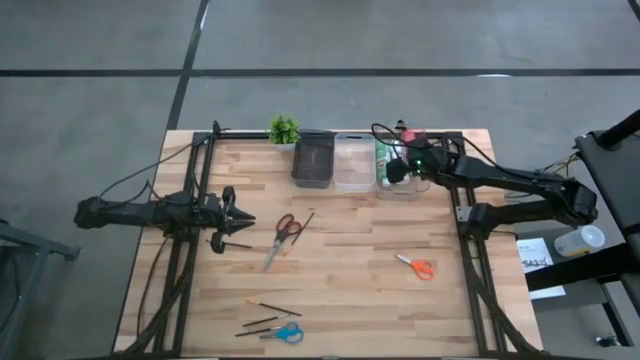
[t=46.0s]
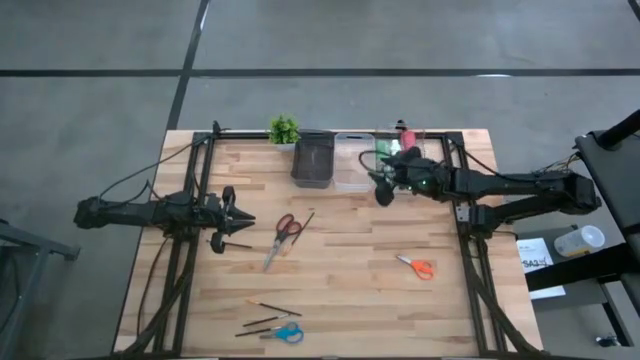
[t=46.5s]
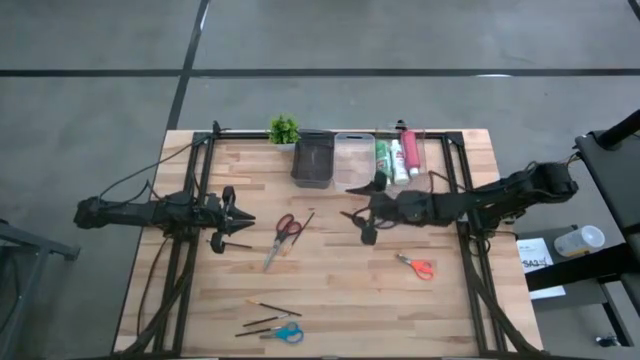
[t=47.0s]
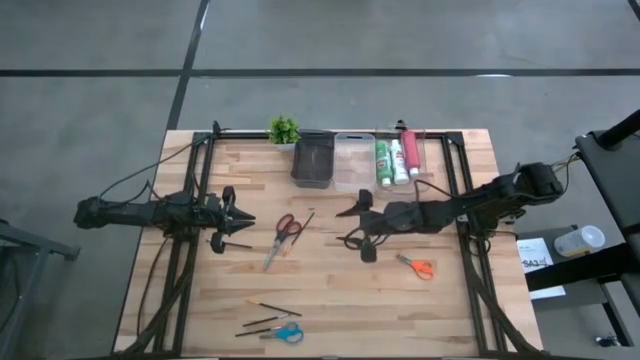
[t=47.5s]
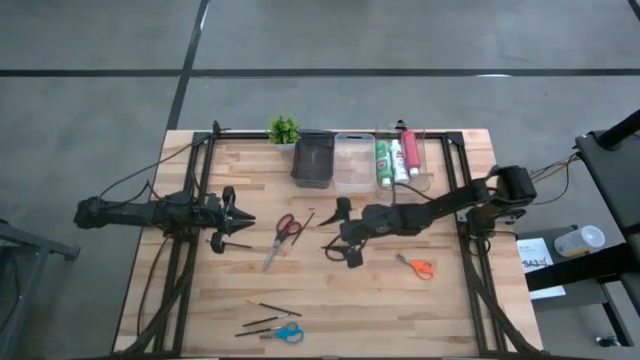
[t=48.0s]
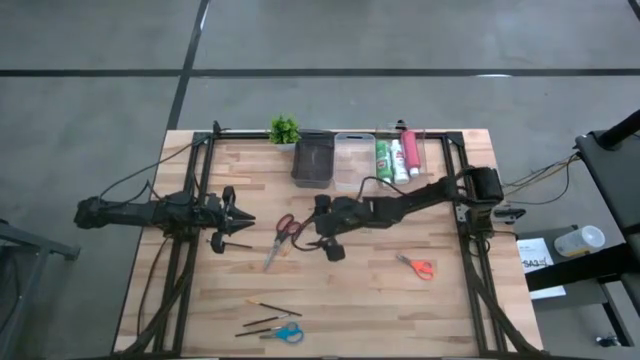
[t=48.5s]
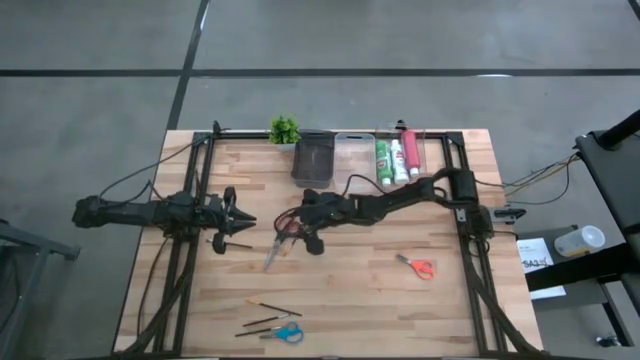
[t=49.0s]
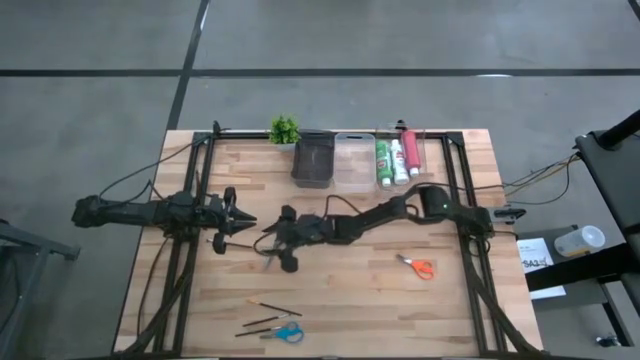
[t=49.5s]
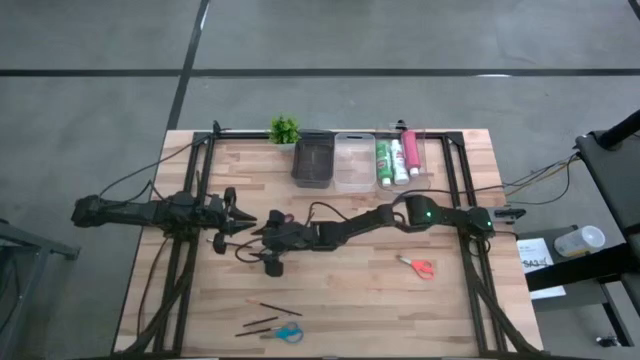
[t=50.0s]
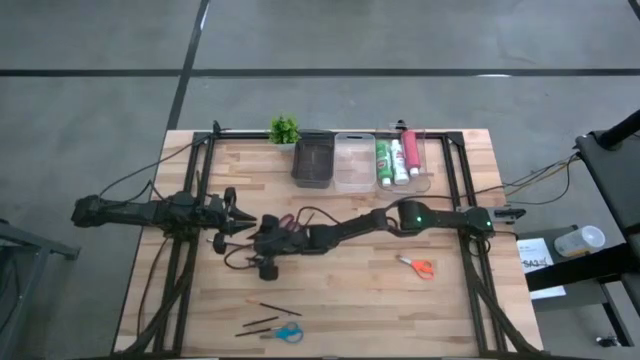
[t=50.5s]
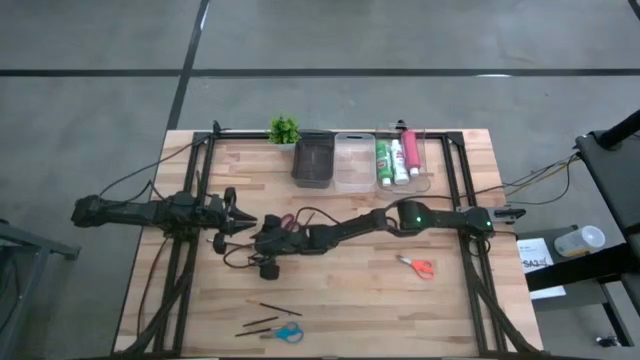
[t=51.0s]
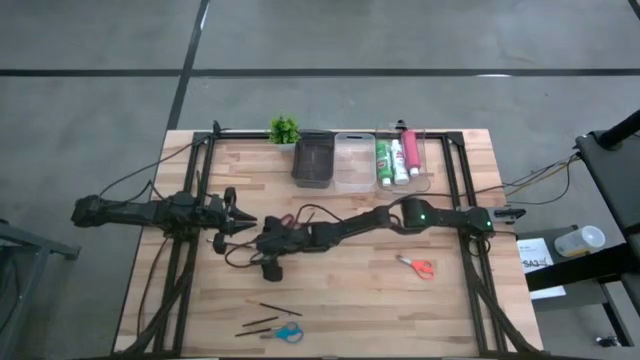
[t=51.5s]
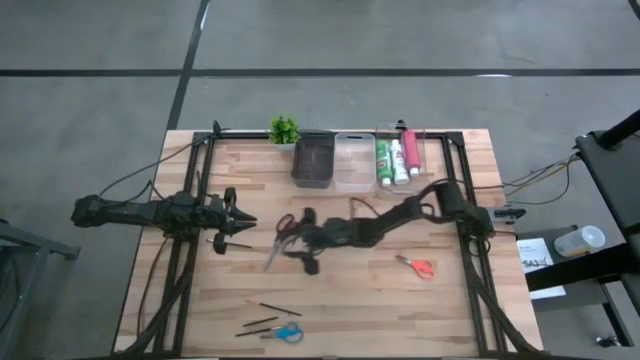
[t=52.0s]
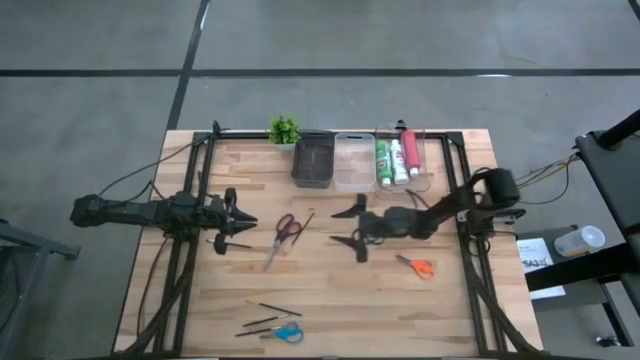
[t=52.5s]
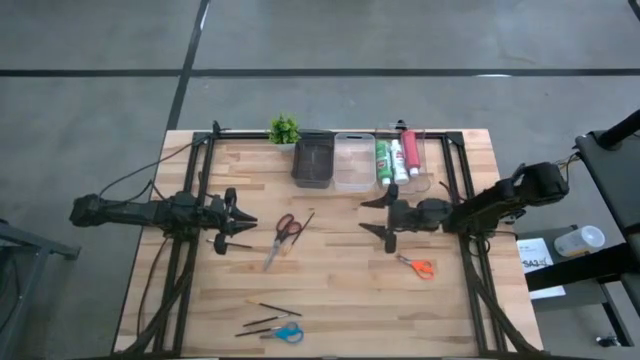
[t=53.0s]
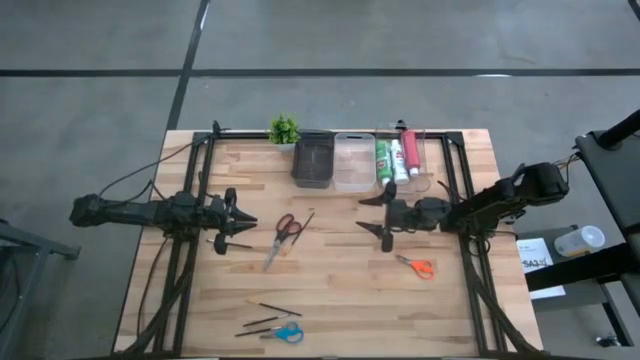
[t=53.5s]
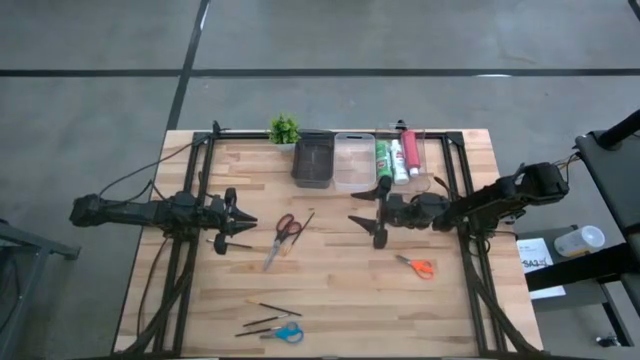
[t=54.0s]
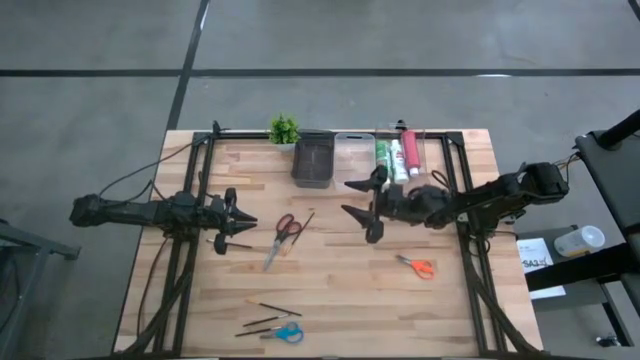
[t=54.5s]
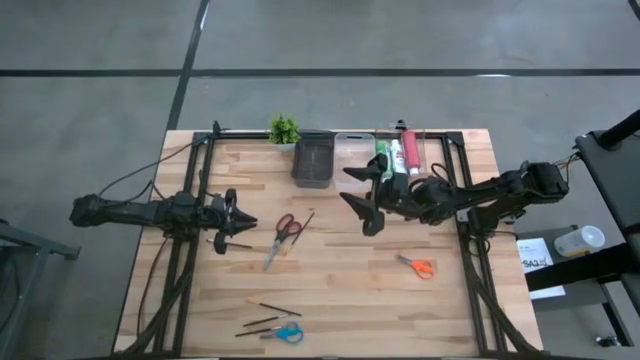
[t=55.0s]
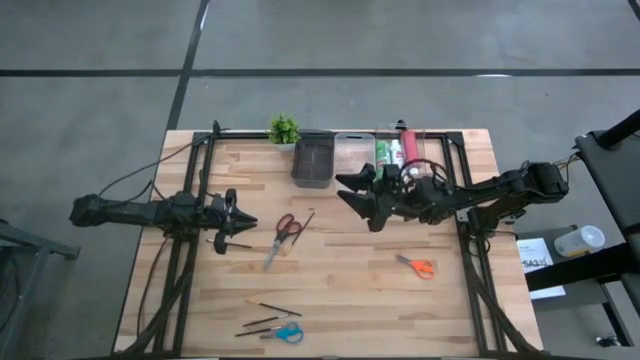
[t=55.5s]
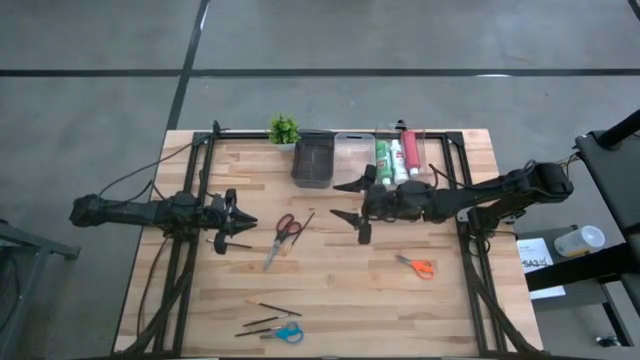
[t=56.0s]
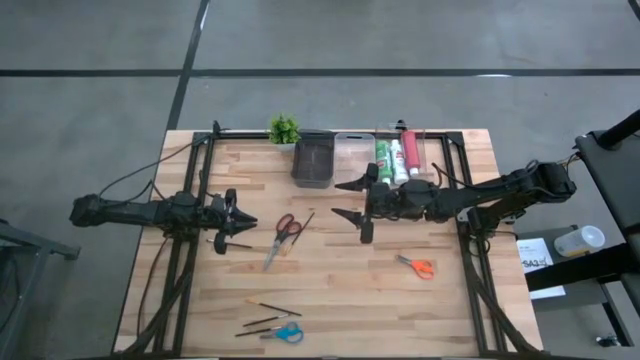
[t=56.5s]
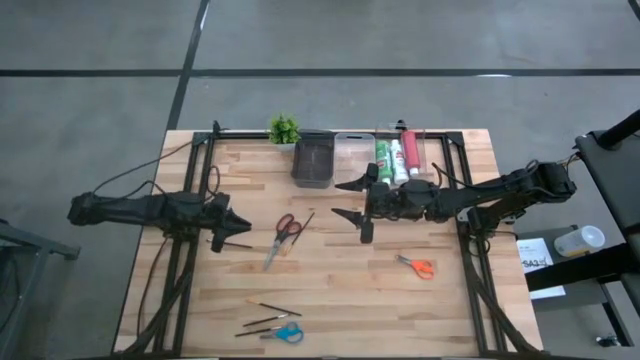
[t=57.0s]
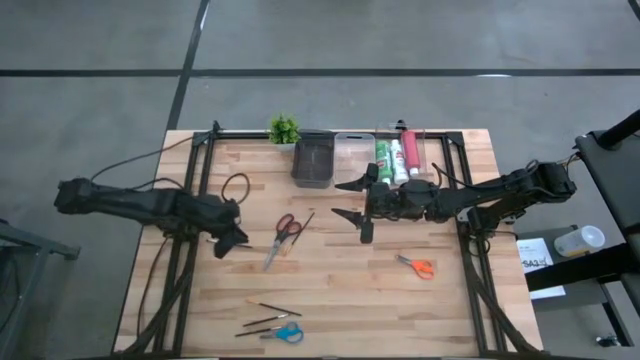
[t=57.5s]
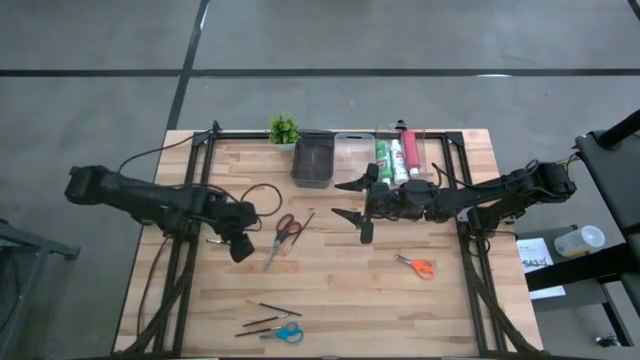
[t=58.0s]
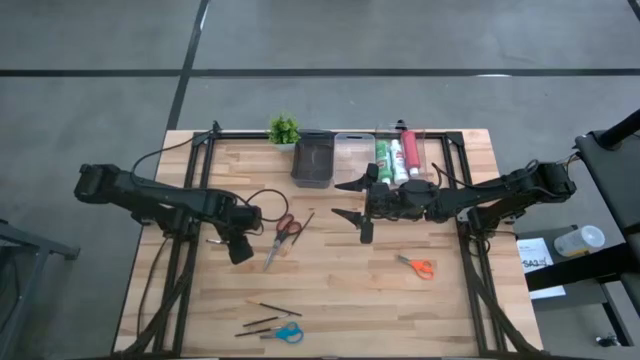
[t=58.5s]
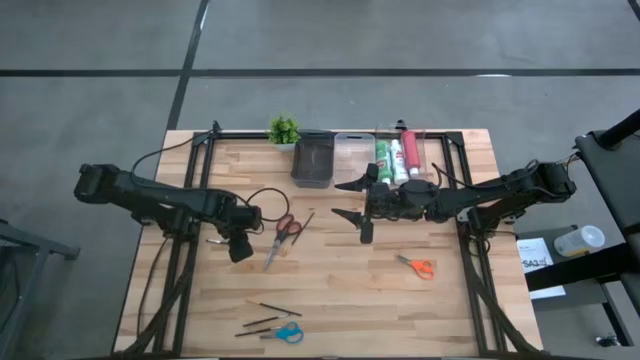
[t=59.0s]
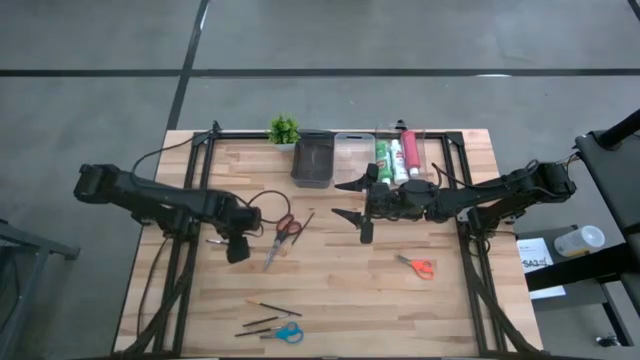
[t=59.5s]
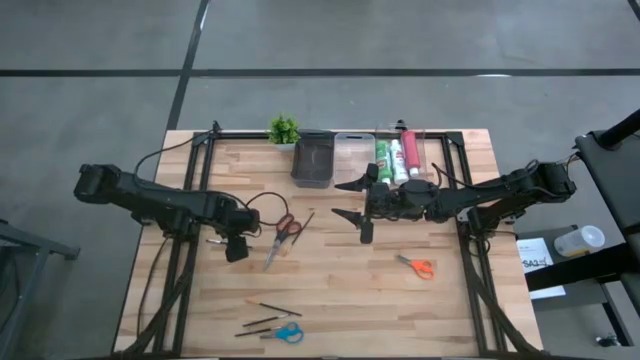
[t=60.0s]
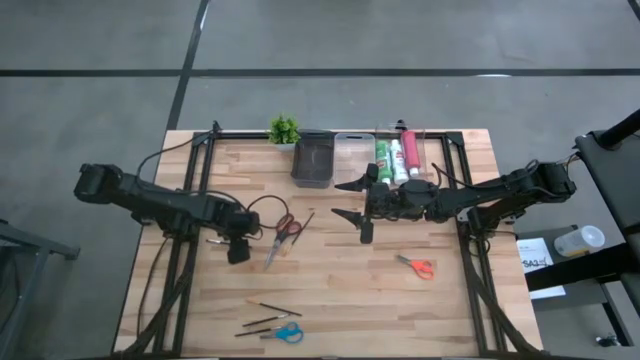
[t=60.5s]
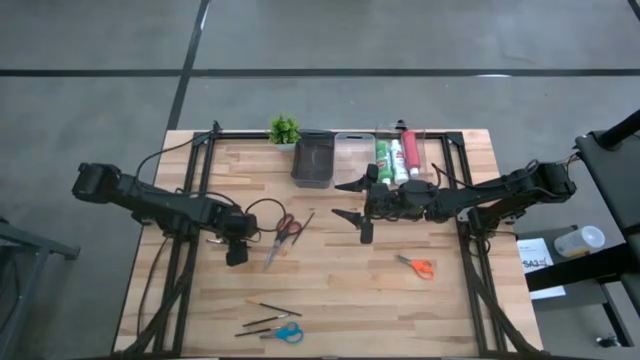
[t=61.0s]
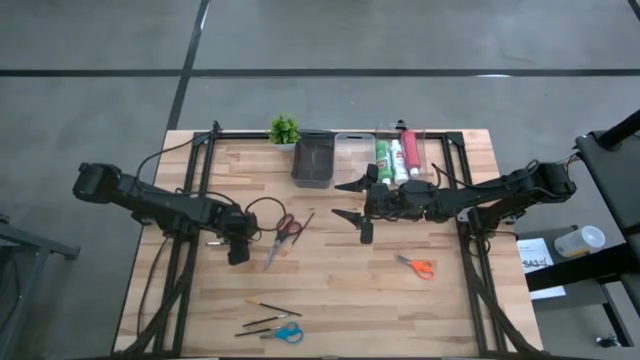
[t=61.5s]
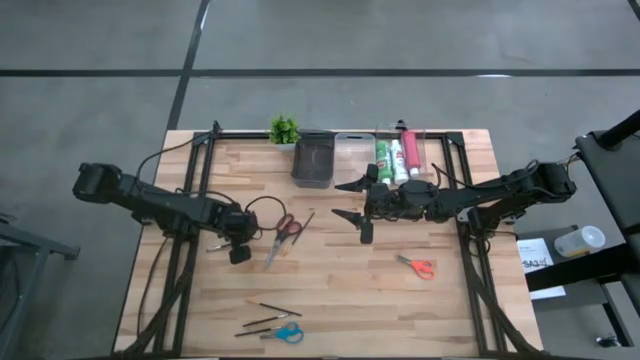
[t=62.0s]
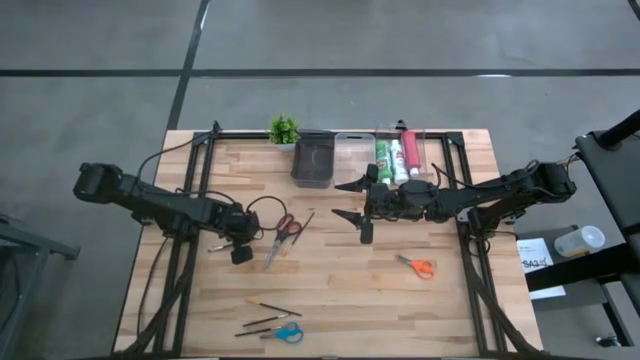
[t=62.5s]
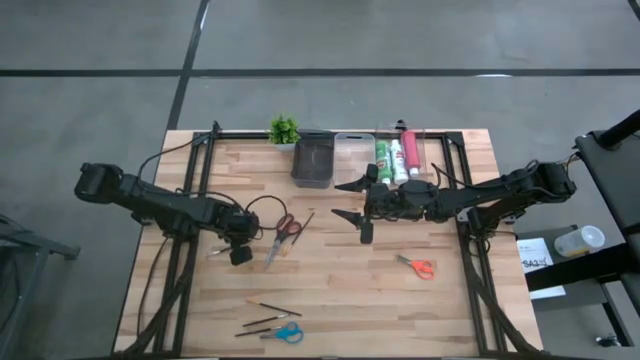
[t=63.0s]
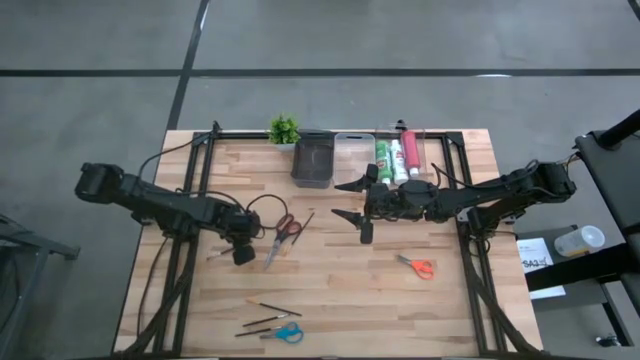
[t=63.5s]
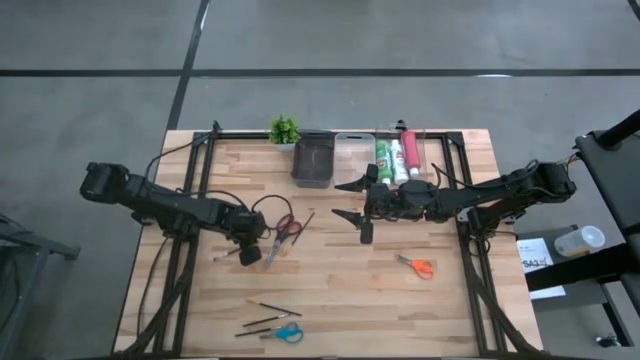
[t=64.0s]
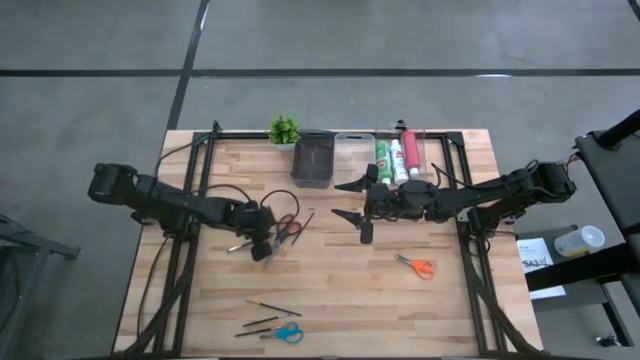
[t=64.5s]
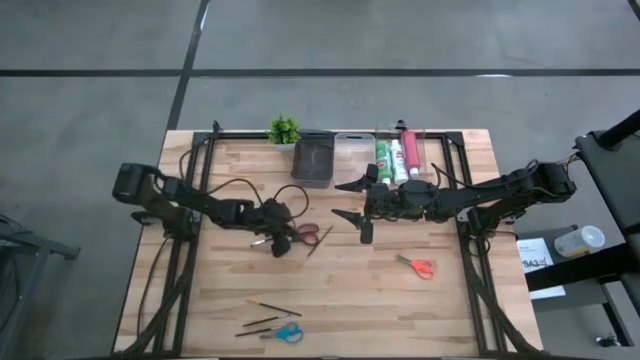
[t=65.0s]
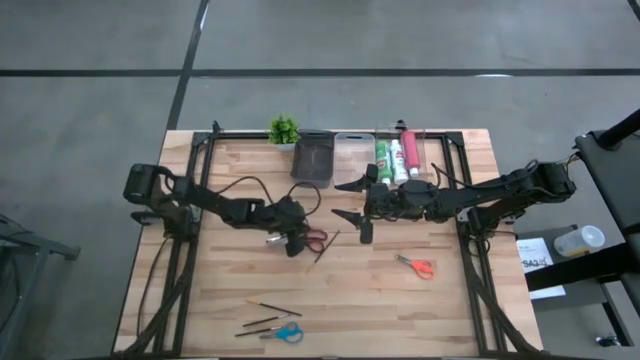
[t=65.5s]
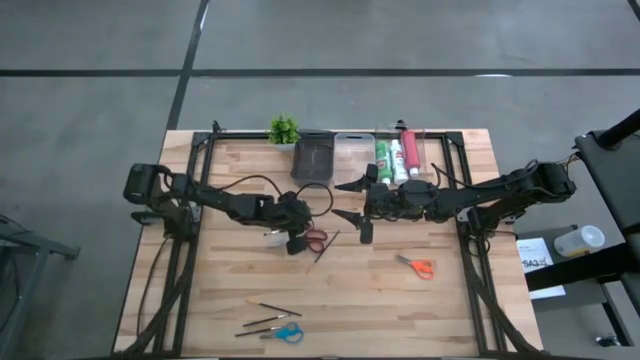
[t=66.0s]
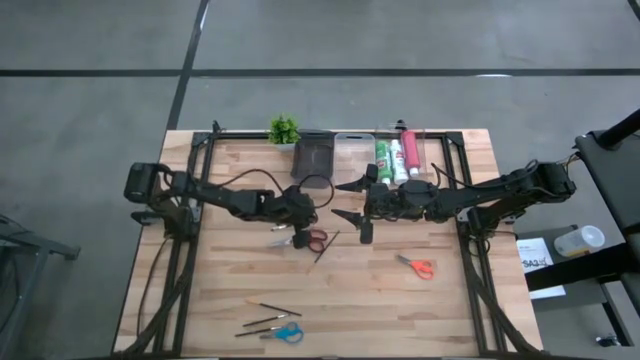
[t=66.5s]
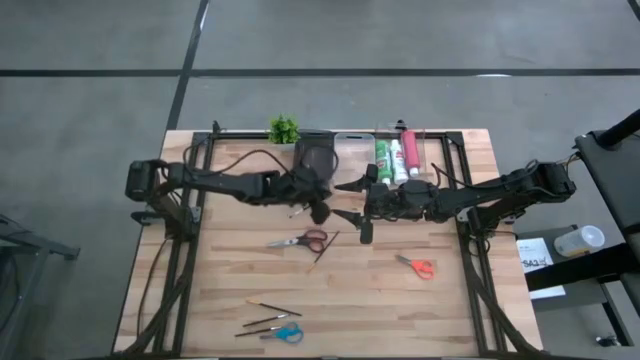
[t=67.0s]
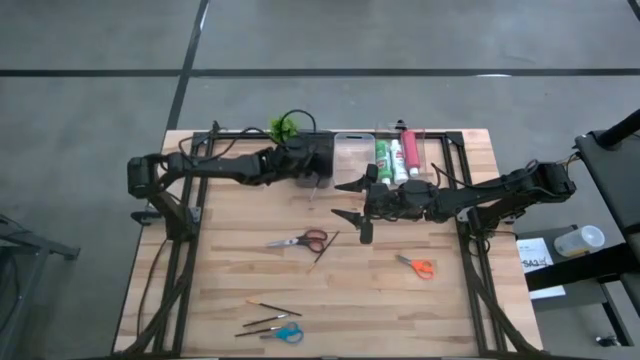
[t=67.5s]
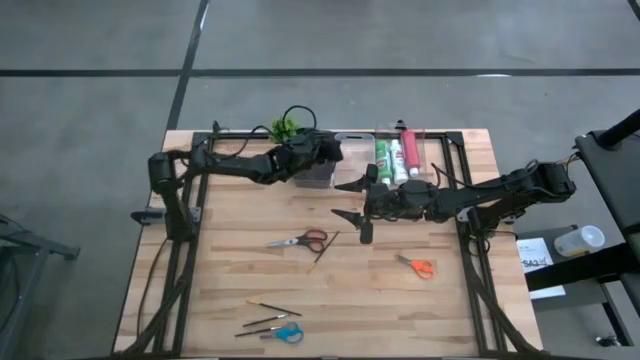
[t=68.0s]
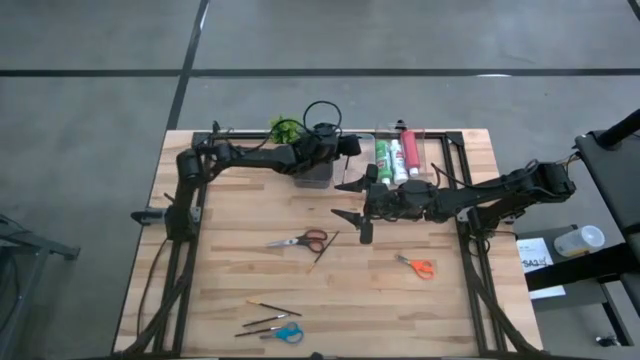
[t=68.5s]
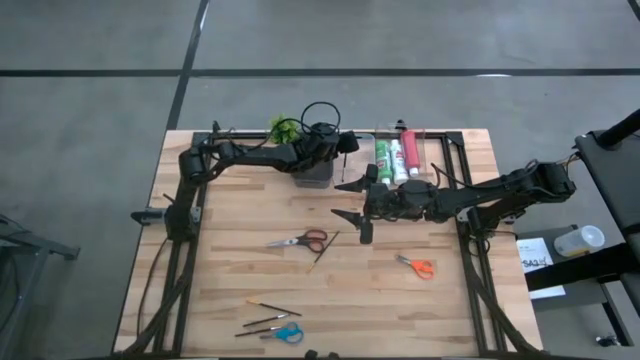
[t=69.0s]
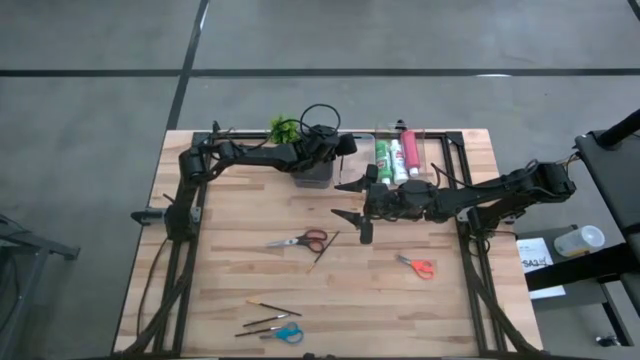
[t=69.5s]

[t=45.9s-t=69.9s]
Task: Pick & Place Paint Supplies
Put the top silver paint brush into the white transparent bin
